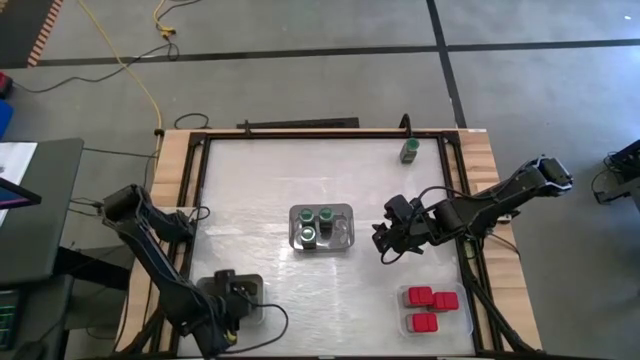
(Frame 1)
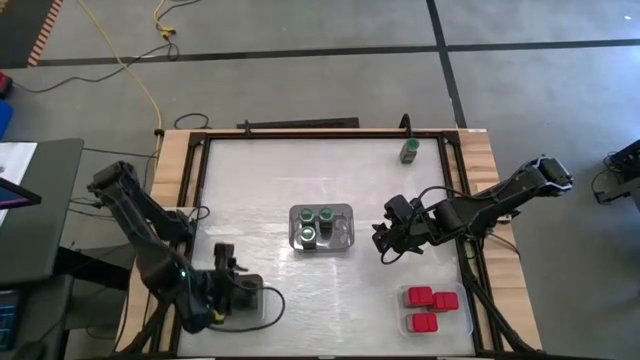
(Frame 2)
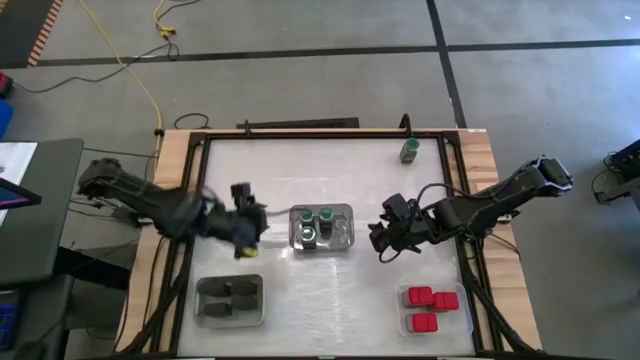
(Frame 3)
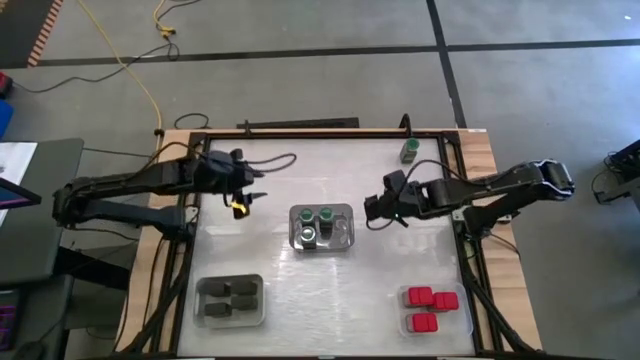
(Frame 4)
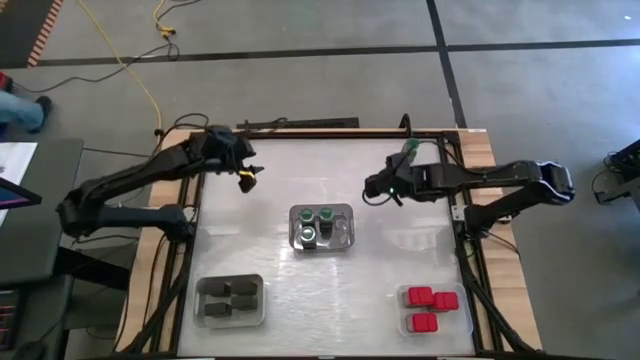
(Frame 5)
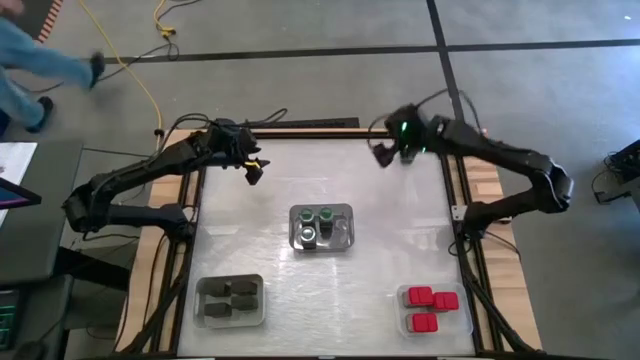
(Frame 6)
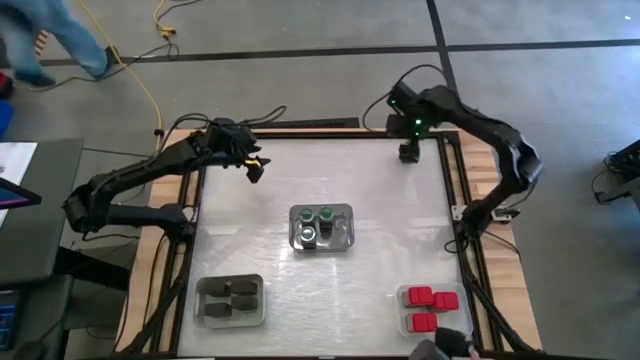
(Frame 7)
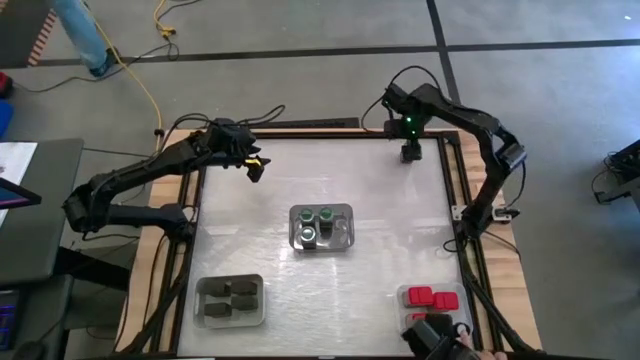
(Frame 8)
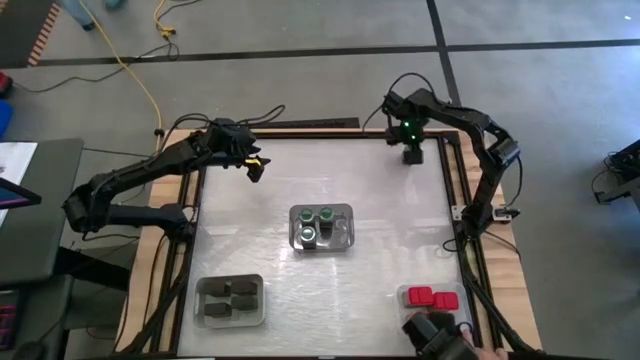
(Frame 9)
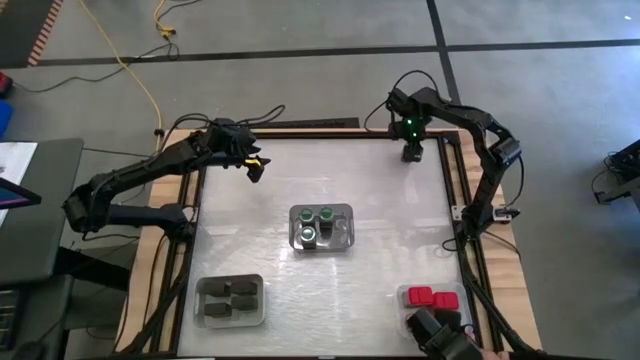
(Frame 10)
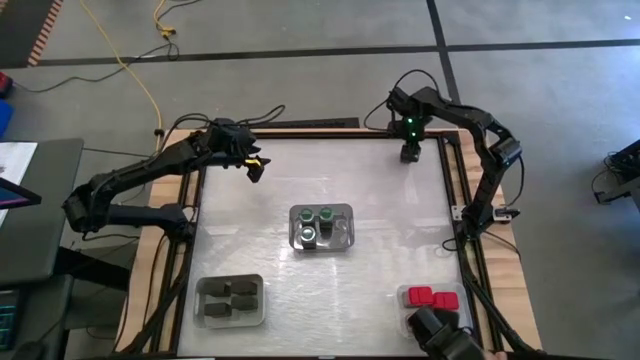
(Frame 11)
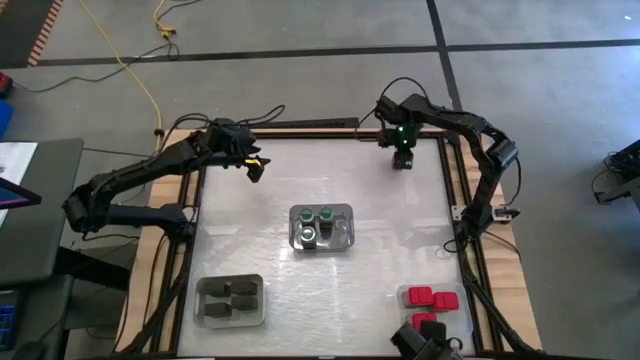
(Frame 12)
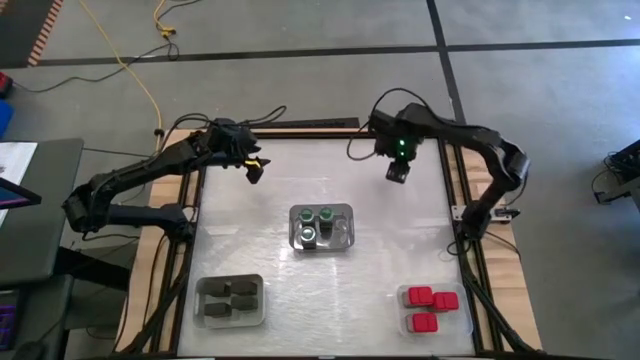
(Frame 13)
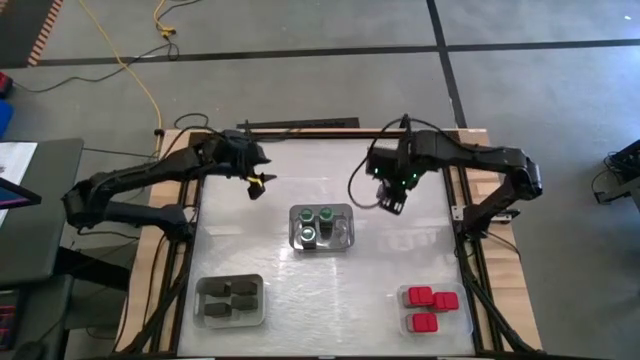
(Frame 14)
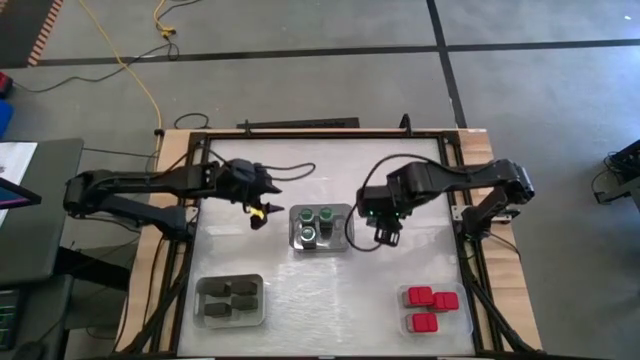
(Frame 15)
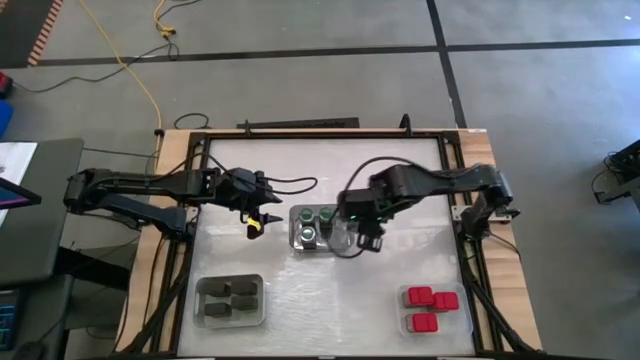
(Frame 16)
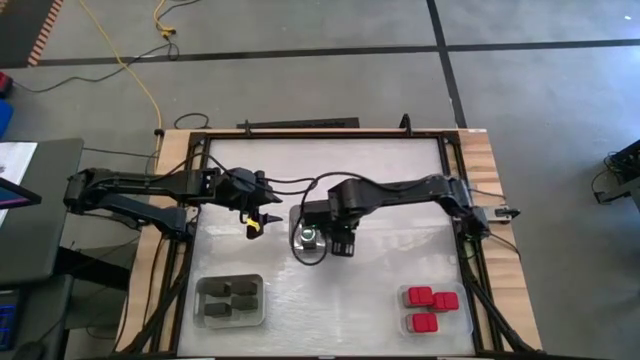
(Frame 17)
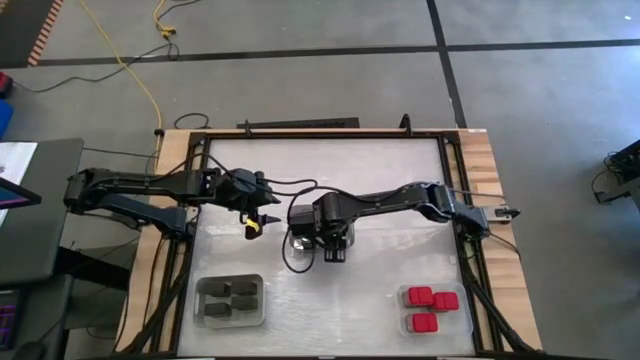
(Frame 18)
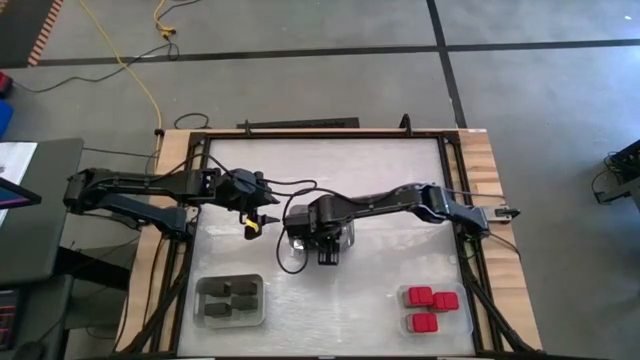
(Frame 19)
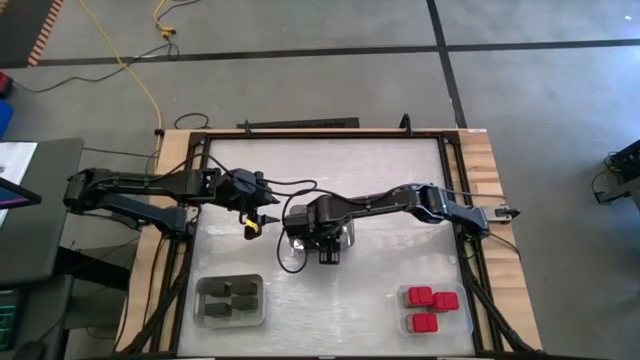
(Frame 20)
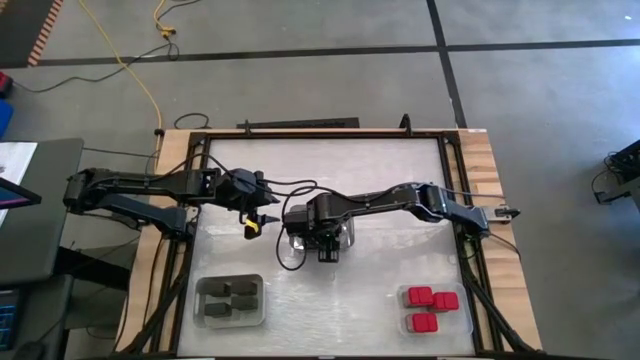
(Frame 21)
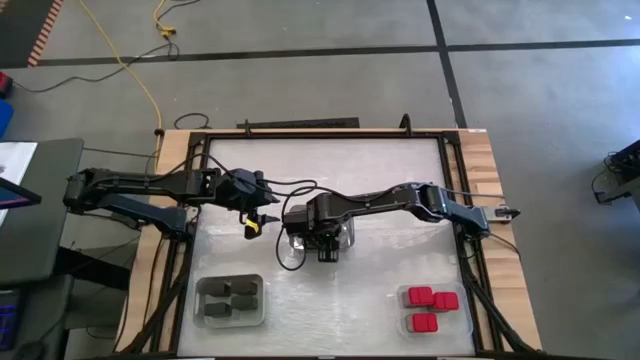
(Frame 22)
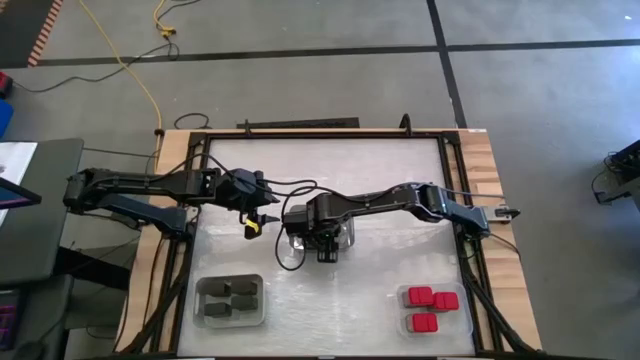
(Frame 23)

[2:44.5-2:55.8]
Task: Sort spices by type
Put the green seasoning bottle into the black bin

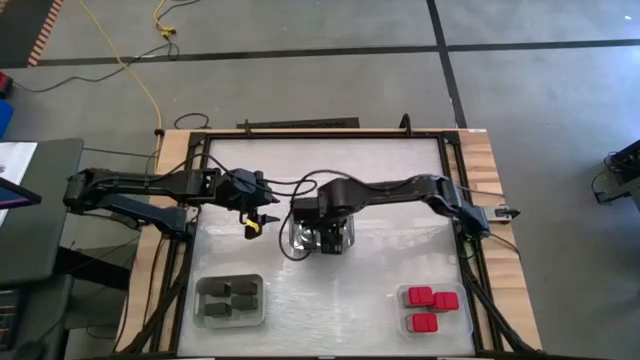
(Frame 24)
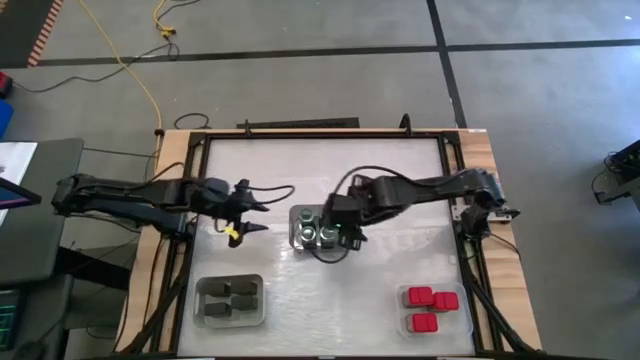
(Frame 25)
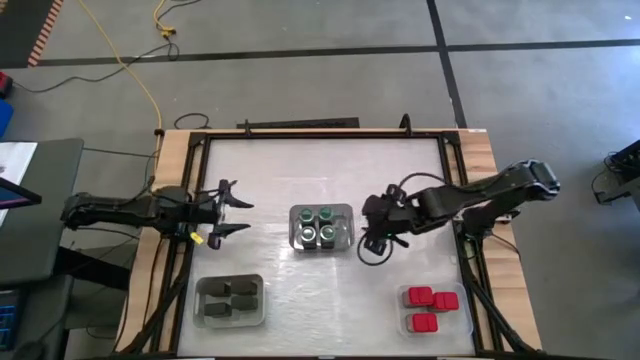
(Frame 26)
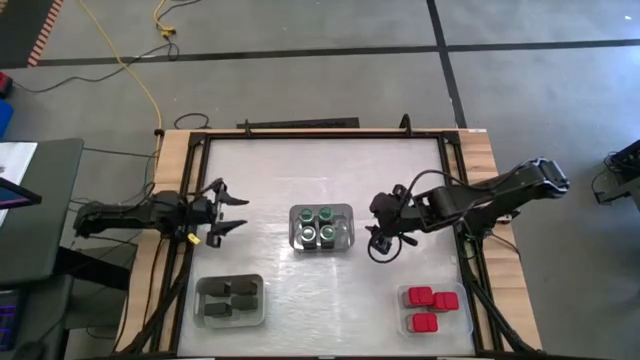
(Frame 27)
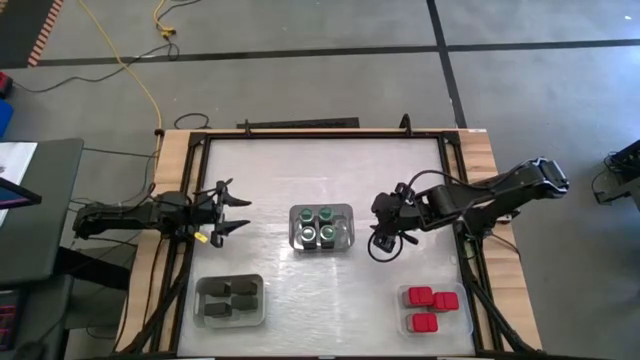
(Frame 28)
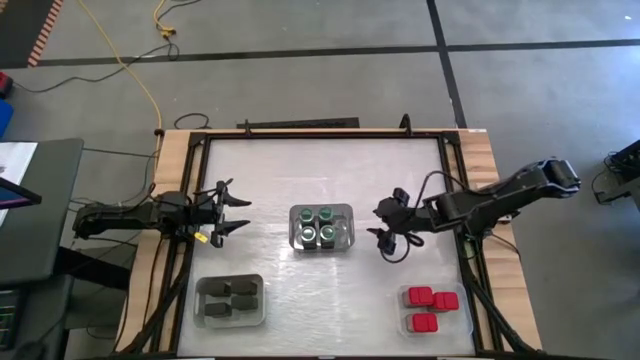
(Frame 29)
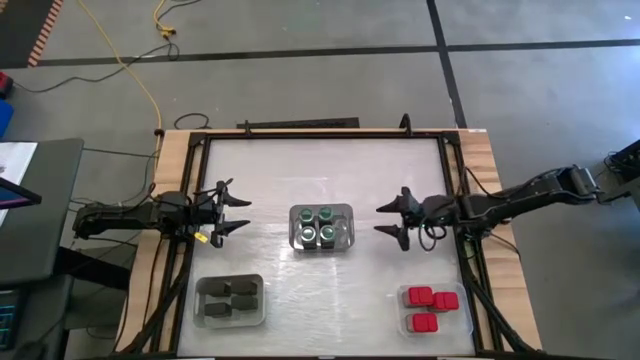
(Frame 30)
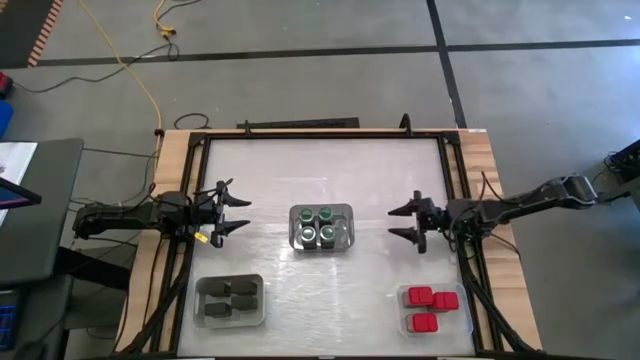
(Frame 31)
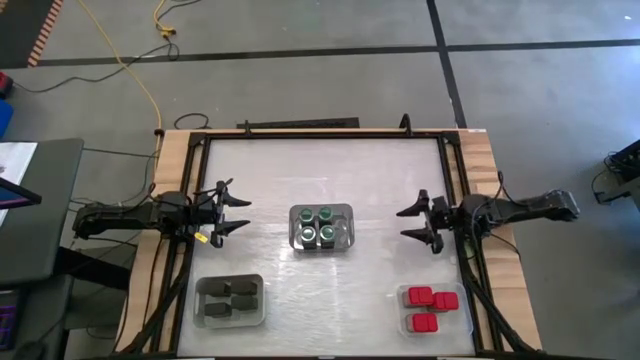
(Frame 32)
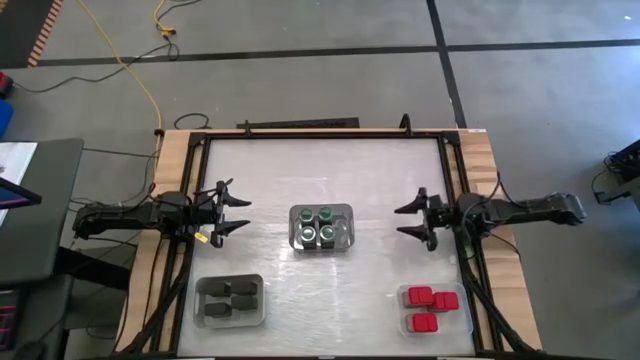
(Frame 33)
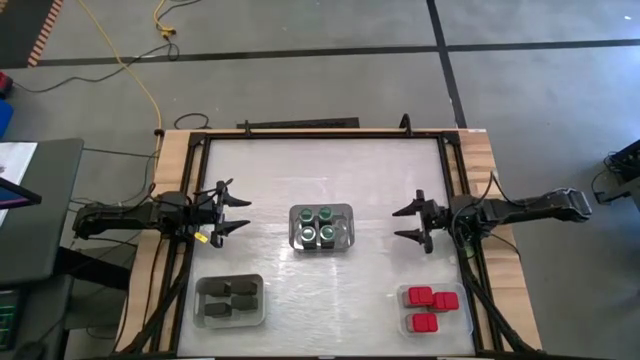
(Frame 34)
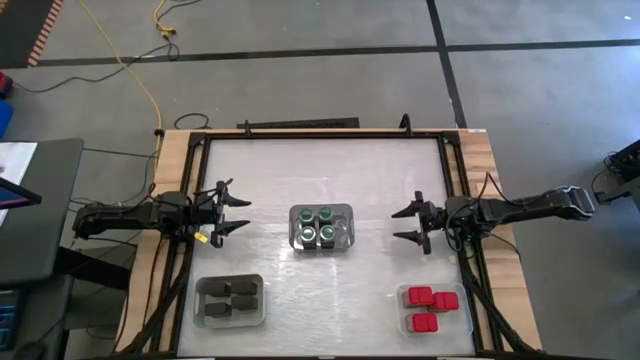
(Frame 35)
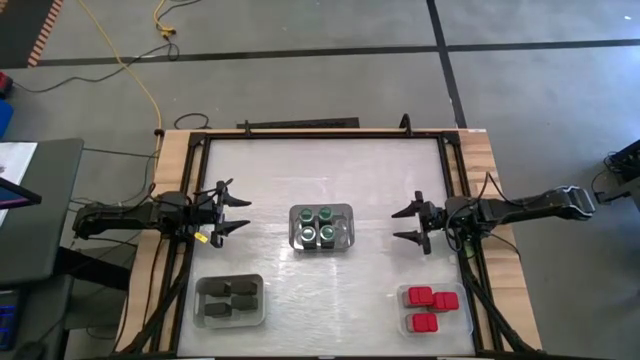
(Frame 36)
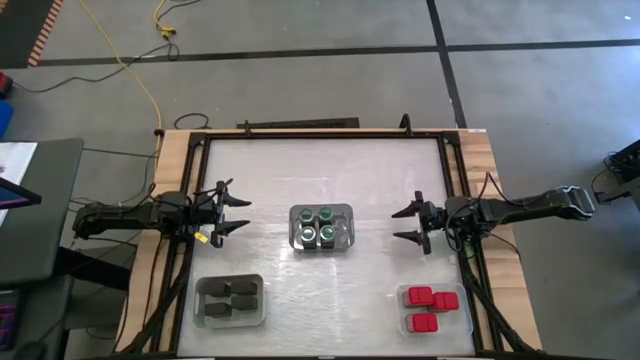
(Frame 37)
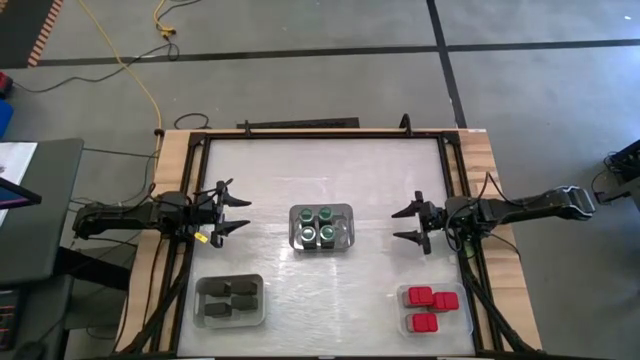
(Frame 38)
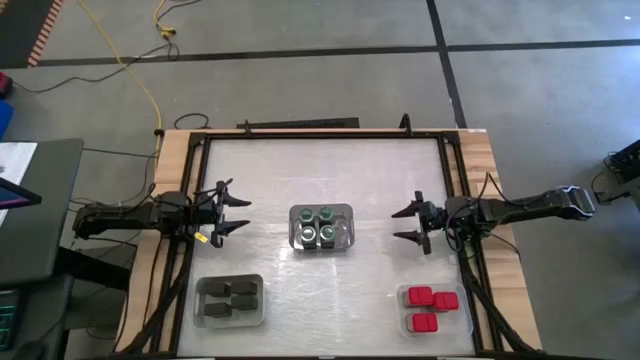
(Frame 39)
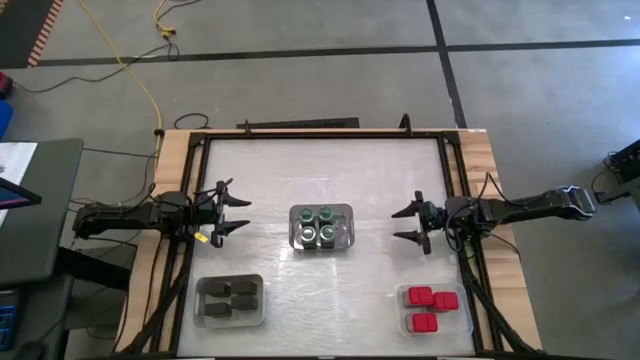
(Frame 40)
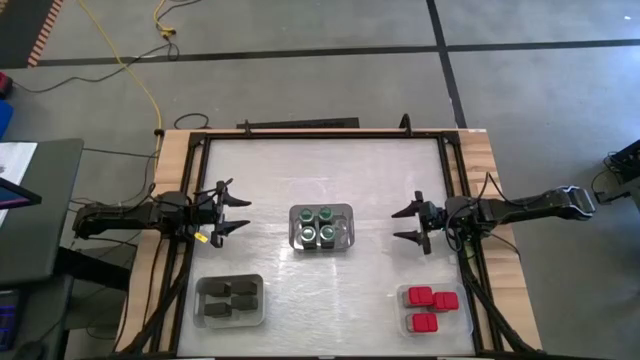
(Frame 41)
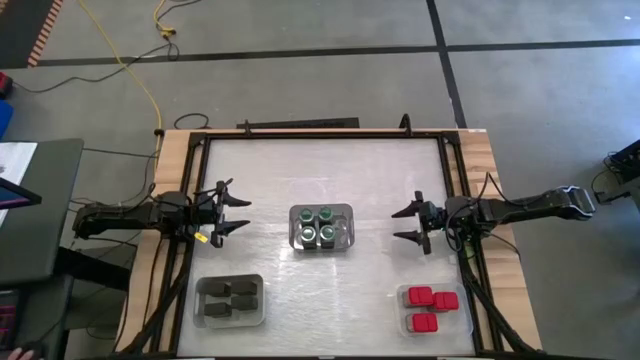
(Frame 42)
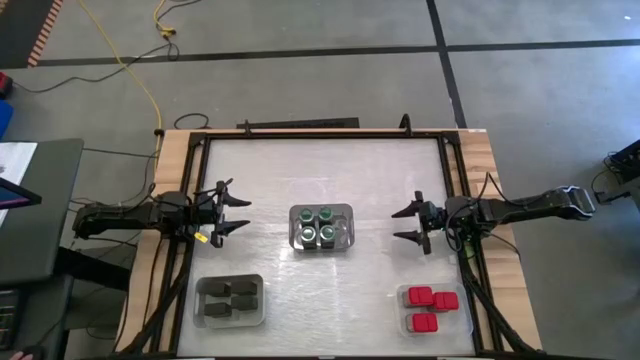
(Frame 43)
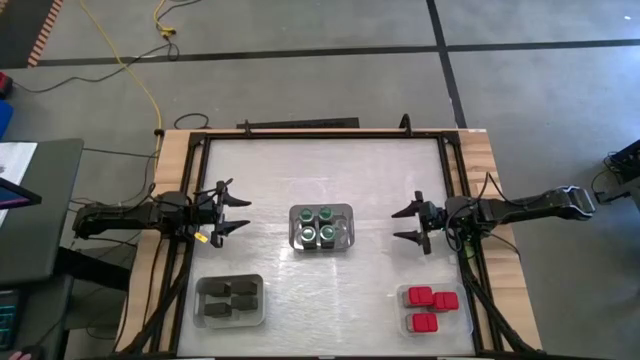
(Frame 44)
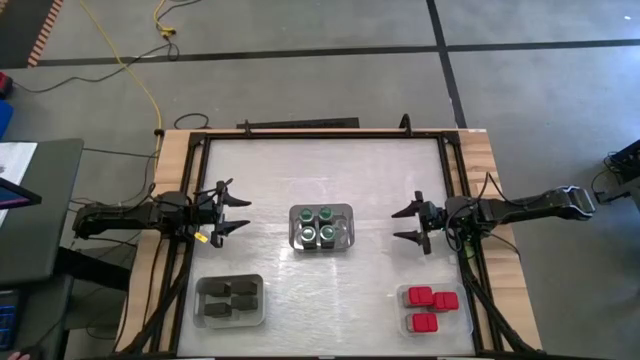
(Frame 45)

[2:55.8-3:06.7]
Return to Home Position
